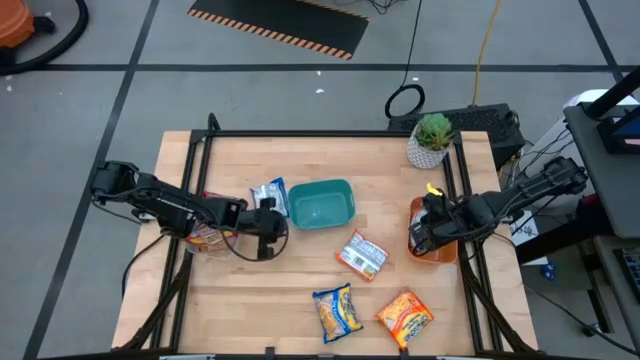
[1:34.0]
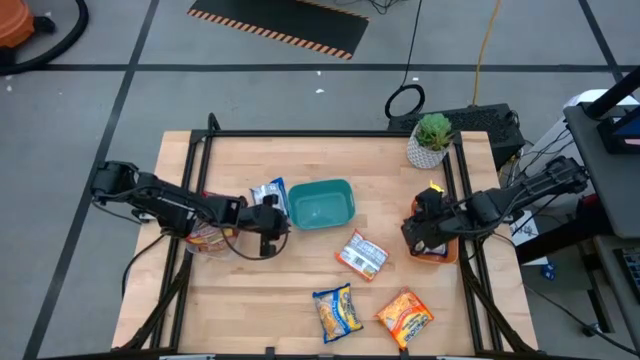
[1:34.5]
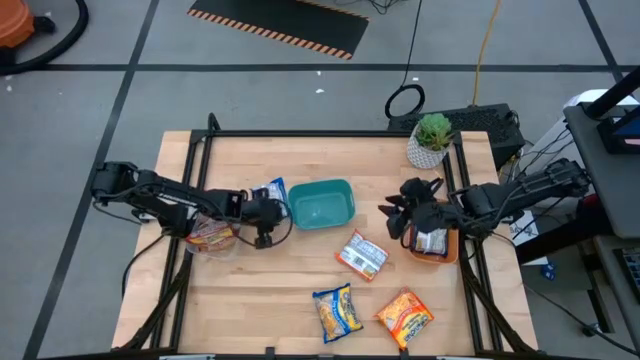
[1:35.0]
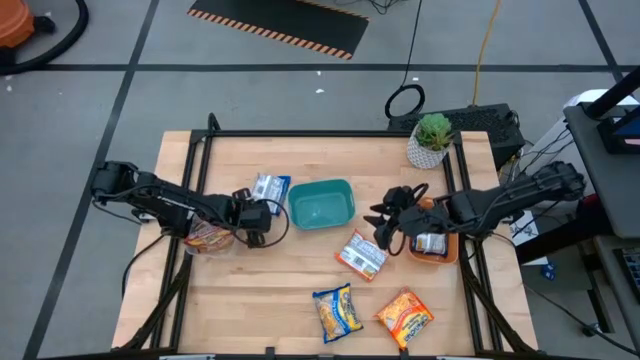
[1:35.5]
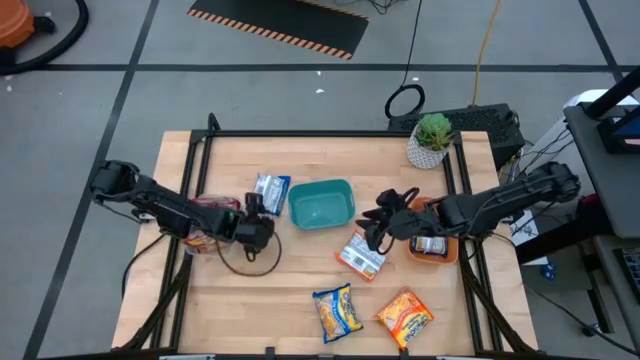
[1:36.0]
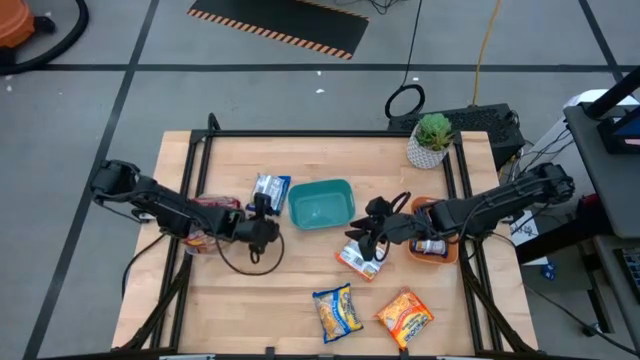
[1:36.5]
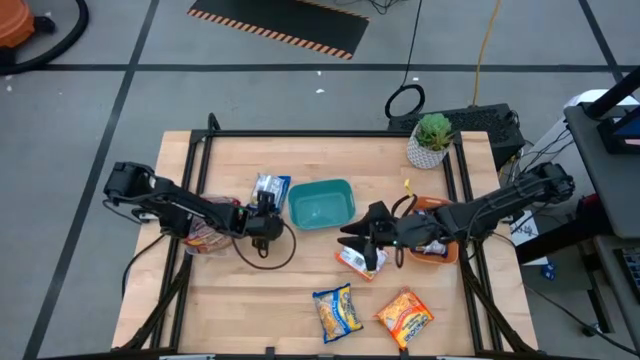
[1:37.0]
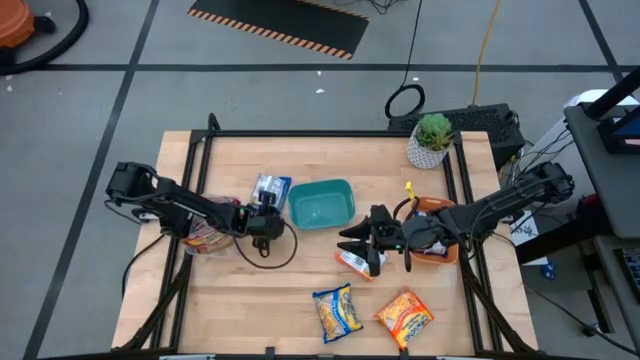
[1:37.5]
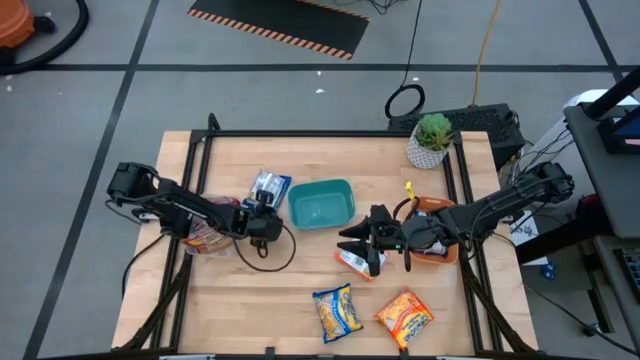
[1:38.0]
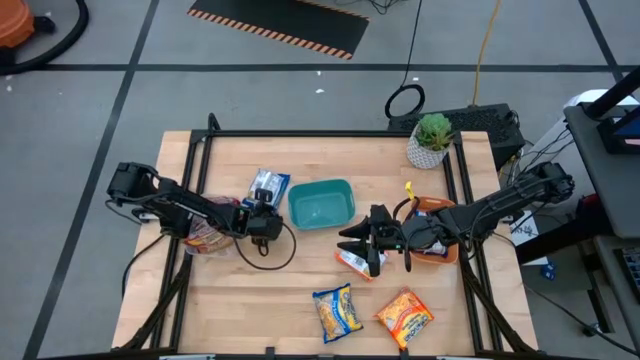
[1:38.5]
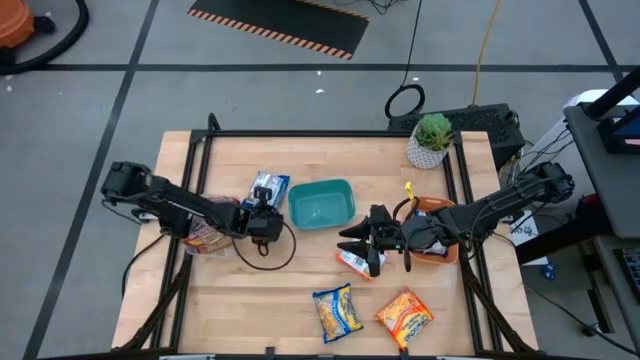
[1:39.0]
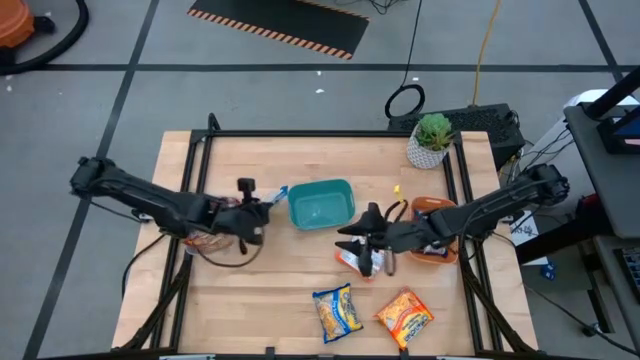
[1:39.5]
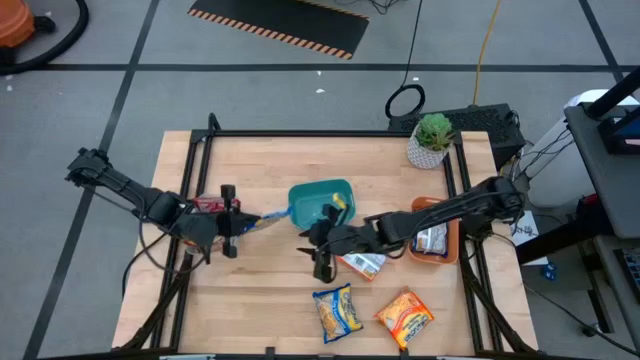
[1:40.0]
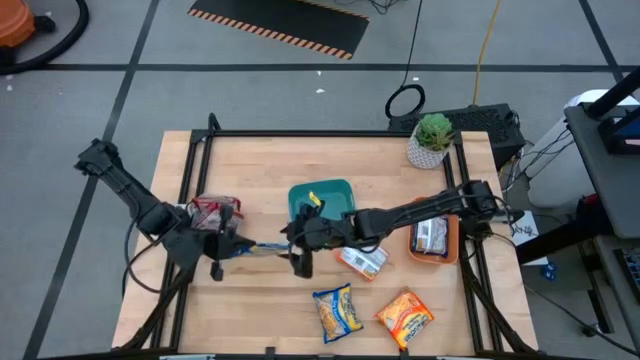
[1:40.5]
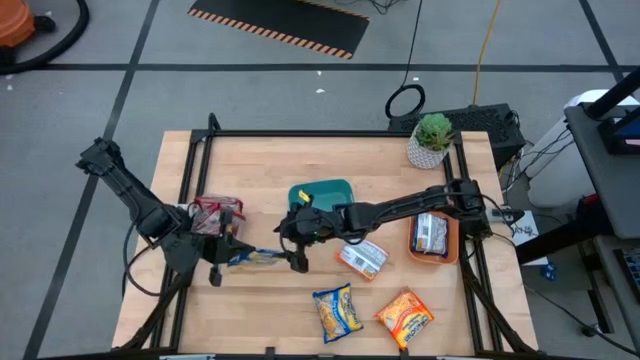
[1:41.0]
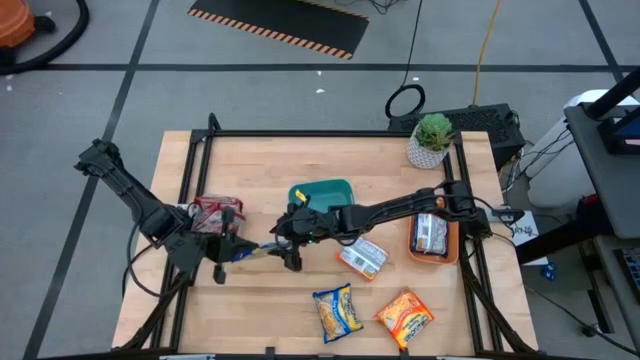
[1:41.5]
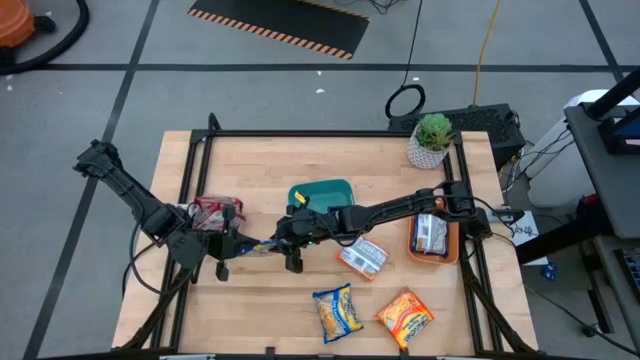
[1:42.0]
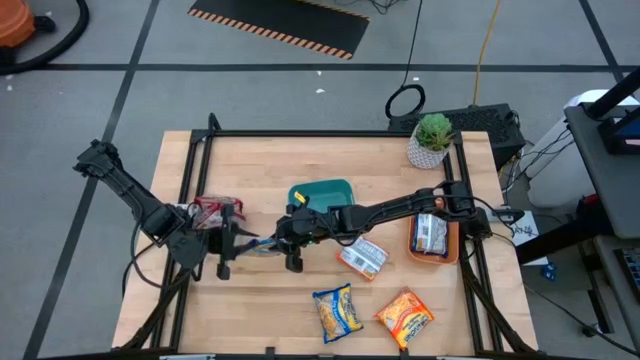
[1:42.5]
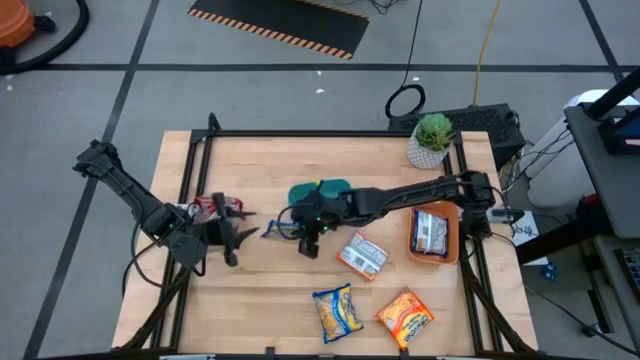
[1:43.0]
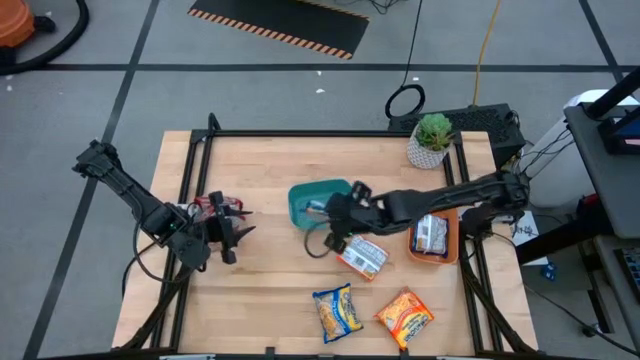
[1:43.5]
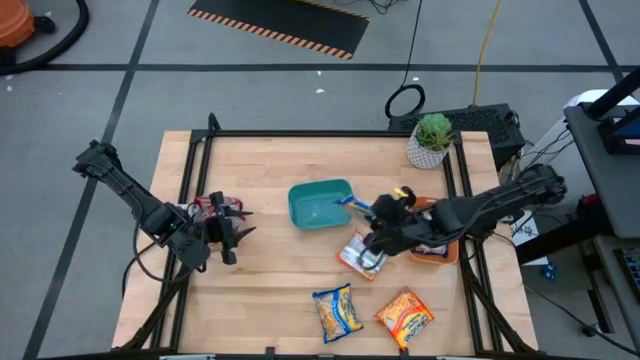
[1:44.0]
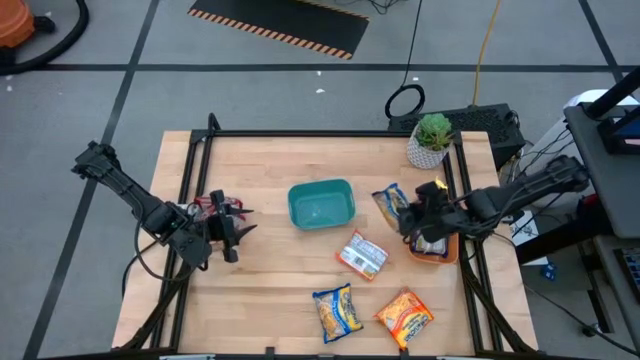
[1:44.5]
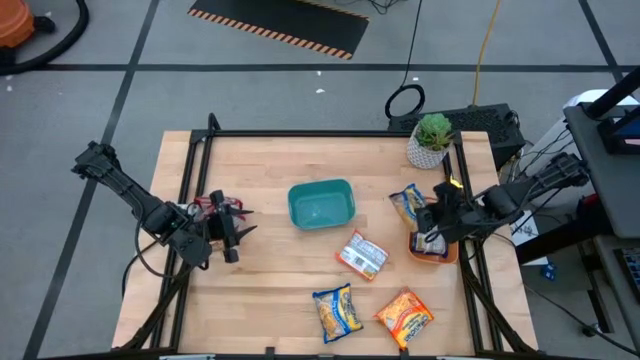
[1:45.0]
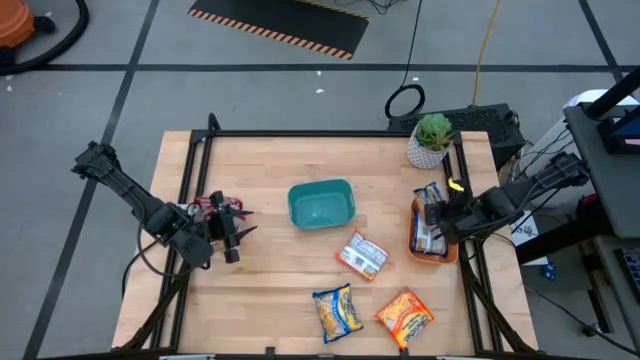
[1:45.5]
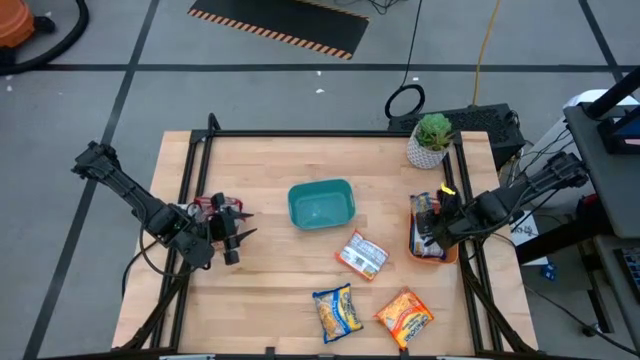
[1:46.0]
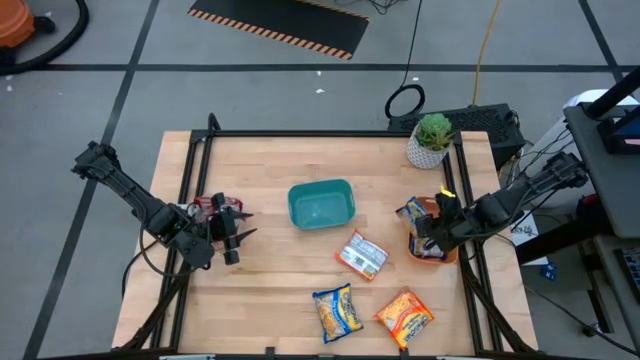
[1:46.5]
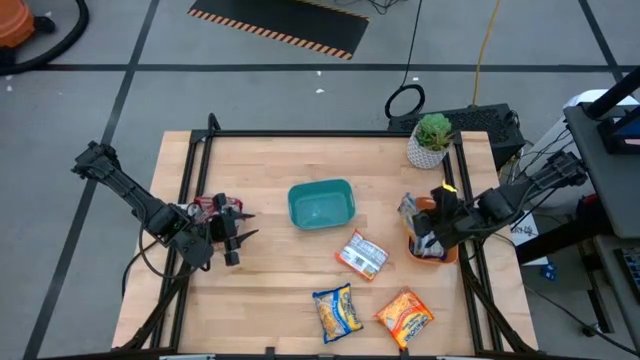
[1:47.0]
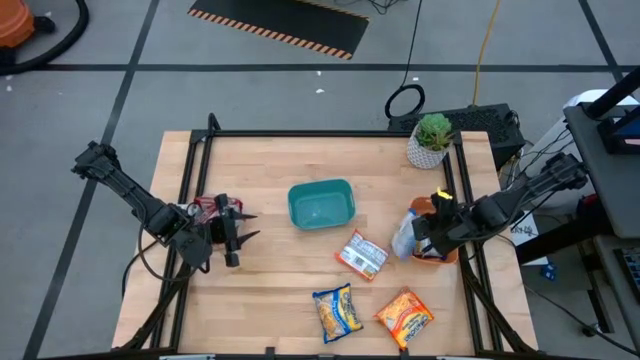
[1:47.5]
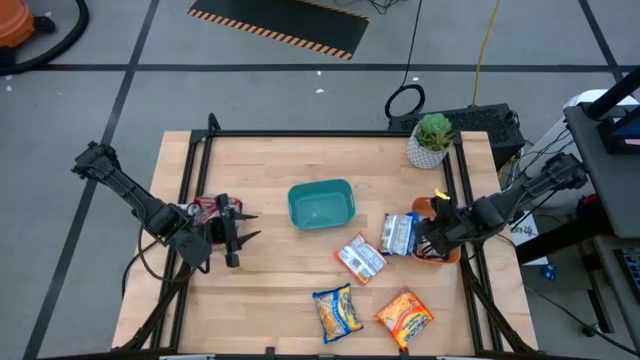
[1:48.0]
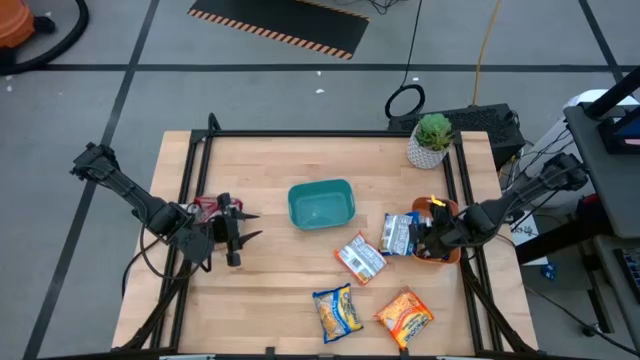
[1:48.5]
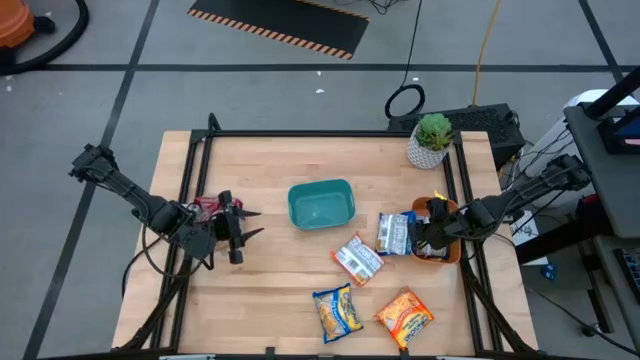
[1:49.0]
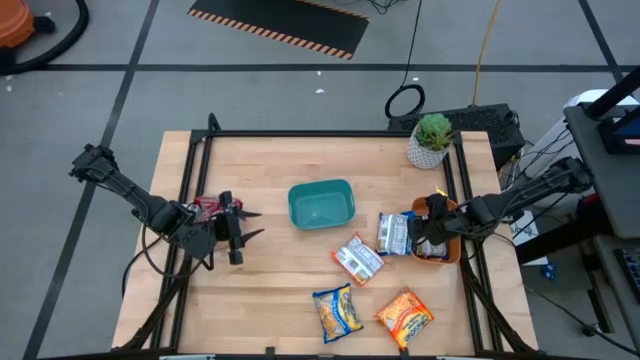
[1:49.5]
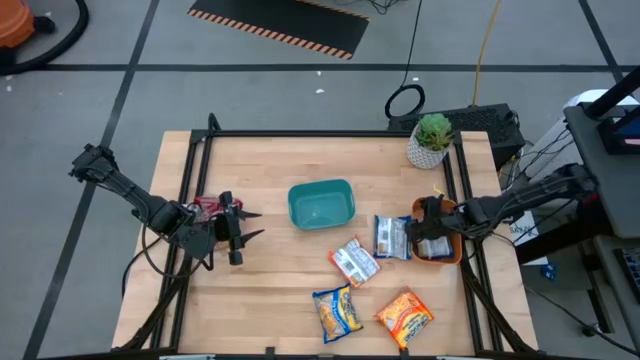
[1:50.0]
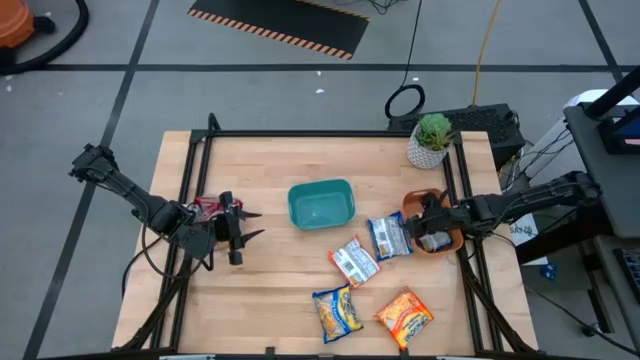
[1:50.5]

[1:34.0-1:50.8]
Task: Sort Maruchan noodles
Put the top blue noodle pack into the orange bin

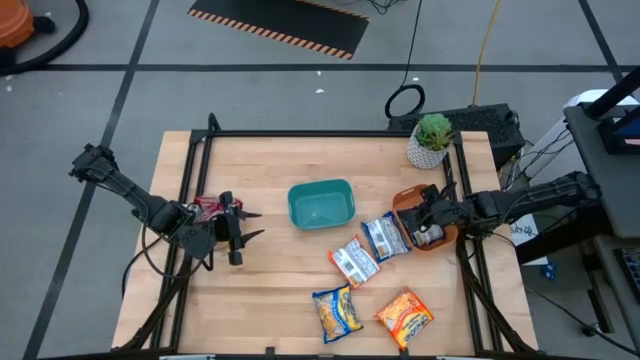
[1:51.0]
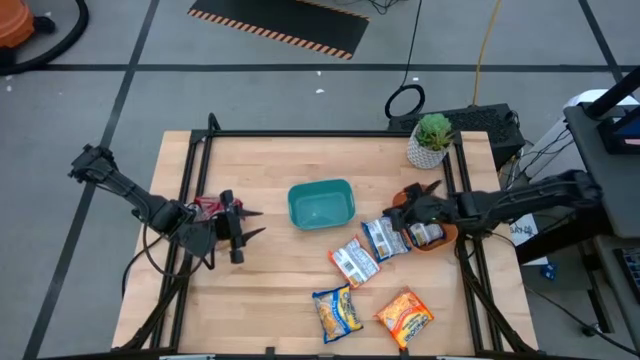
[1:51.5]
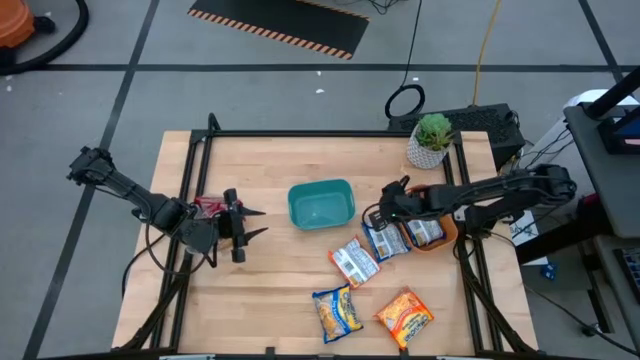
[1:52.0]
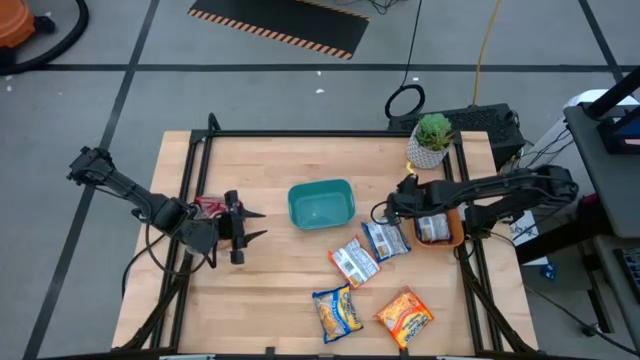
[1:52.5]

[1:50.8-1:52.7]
Adjust the orange bin

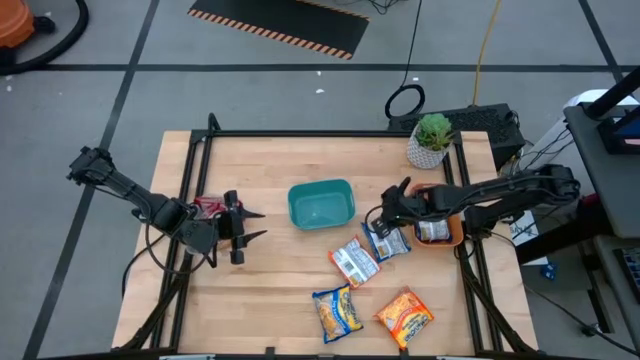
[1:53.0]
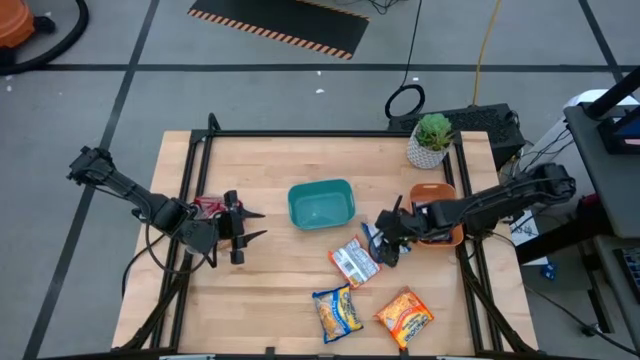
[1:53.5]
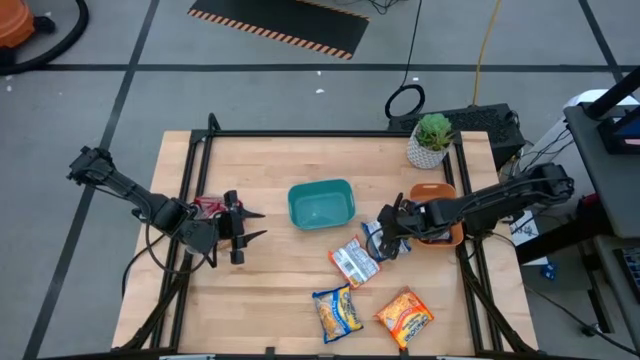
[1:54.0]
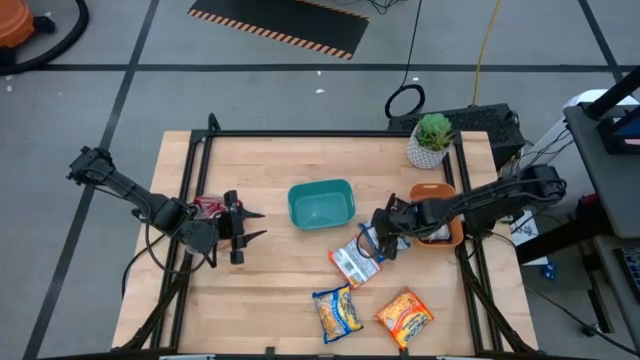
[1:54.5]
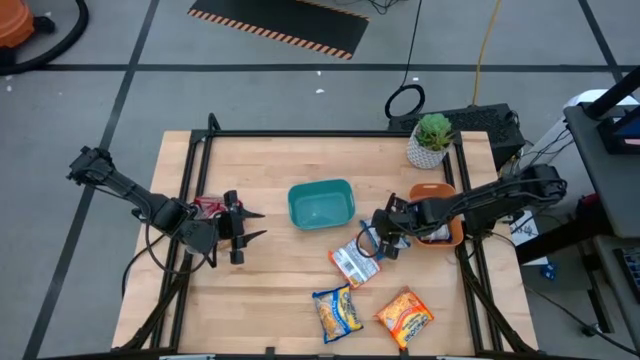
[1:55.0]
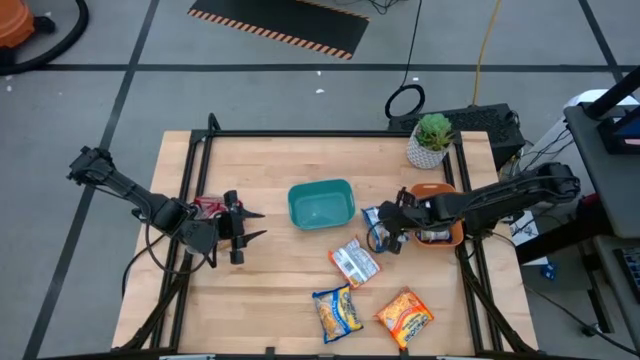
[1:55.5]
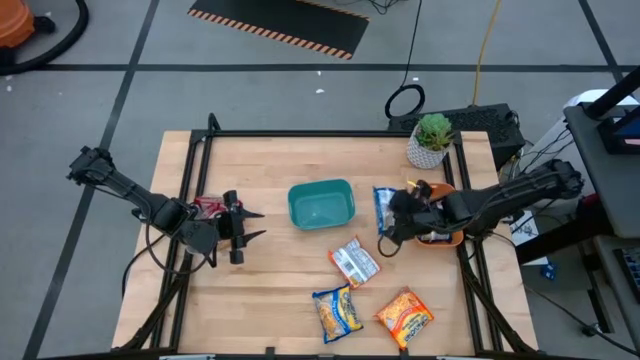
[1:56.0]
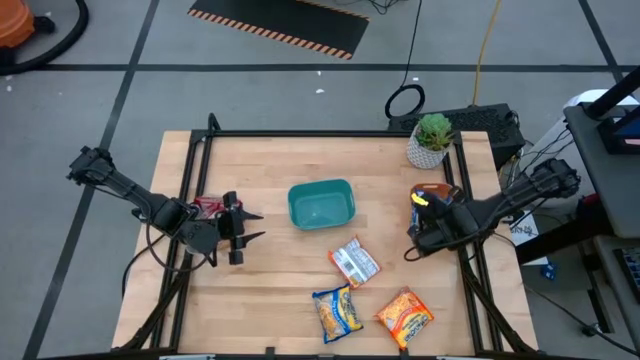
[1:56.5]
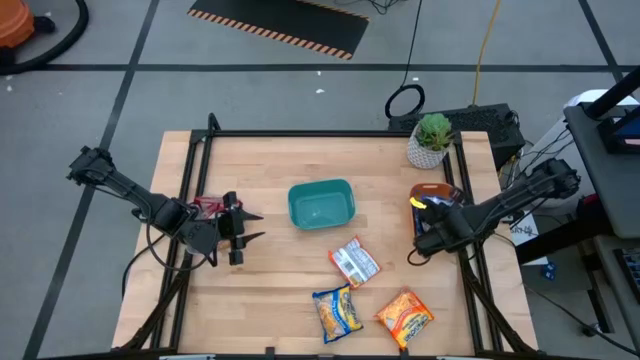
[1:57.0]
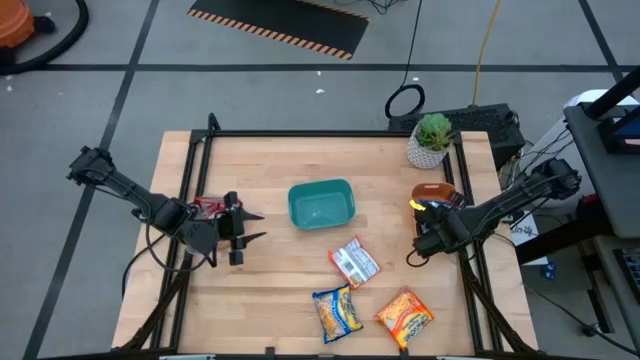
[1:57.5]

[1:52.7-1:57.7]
Put the top blue noodle pack into the orange bin
